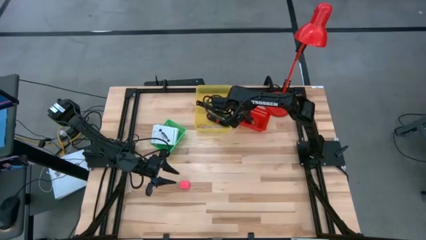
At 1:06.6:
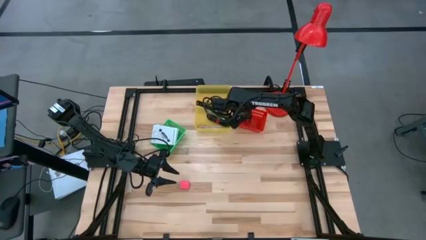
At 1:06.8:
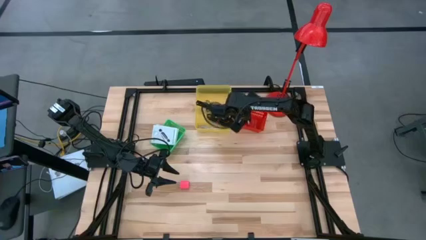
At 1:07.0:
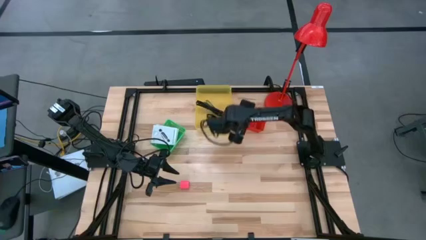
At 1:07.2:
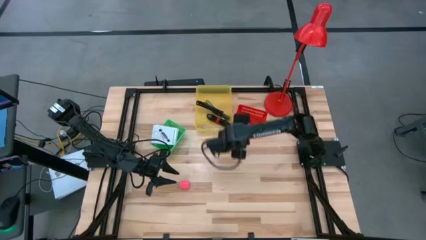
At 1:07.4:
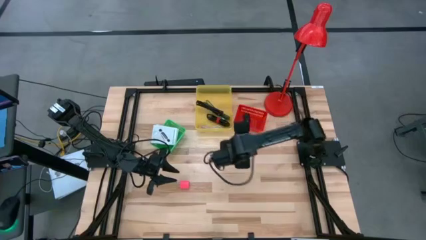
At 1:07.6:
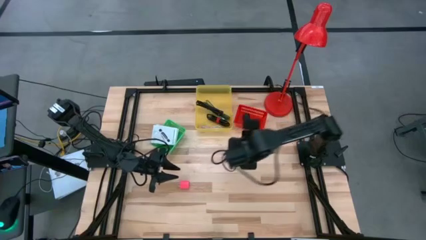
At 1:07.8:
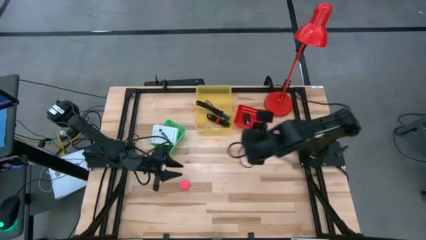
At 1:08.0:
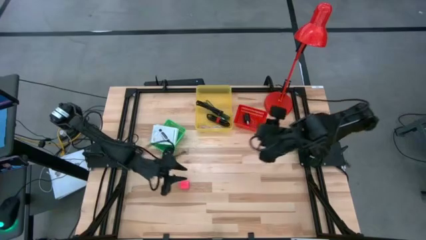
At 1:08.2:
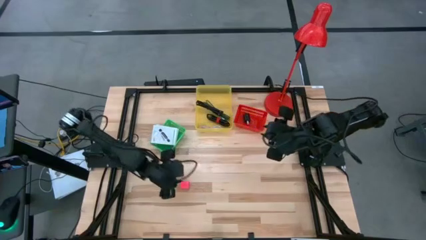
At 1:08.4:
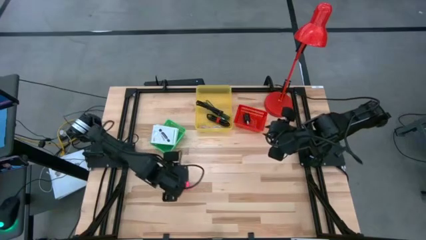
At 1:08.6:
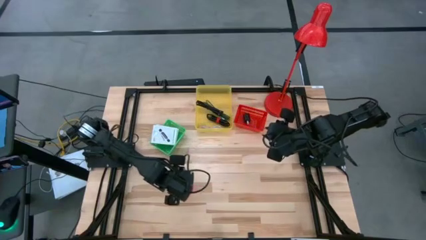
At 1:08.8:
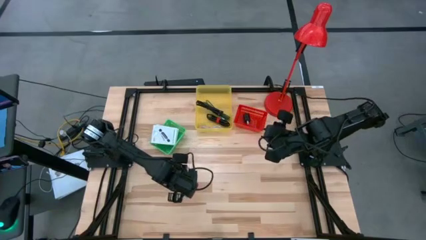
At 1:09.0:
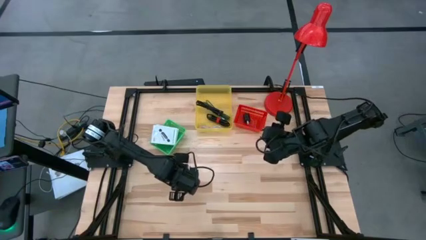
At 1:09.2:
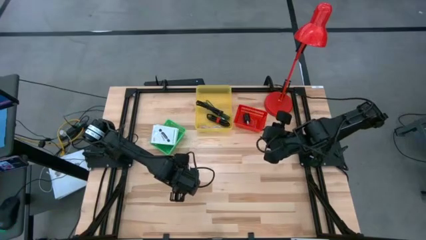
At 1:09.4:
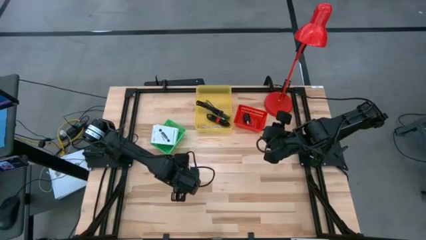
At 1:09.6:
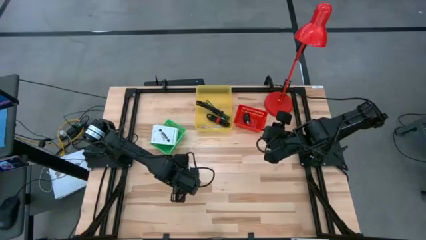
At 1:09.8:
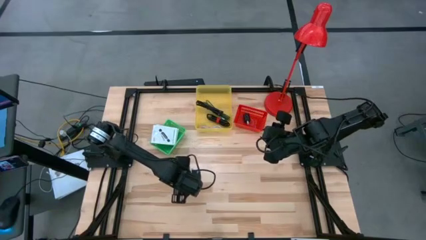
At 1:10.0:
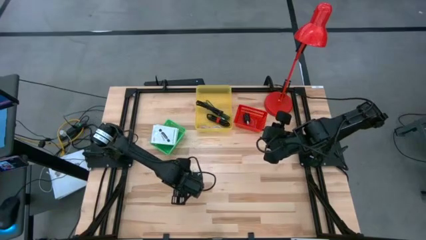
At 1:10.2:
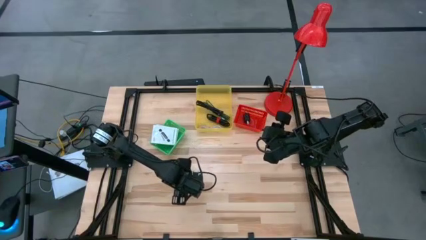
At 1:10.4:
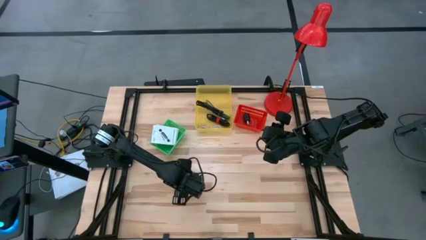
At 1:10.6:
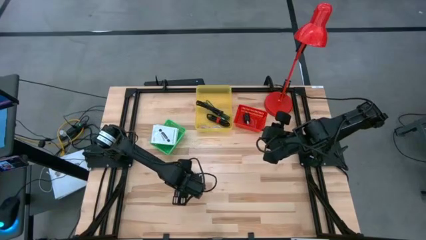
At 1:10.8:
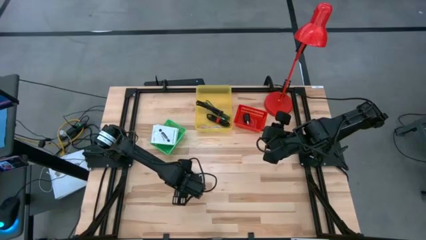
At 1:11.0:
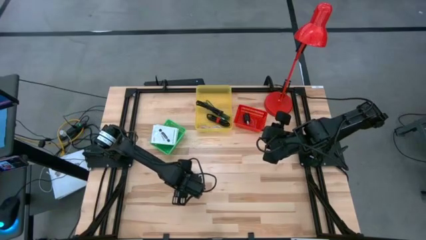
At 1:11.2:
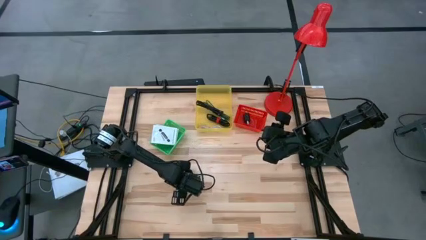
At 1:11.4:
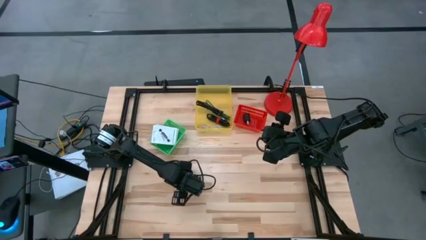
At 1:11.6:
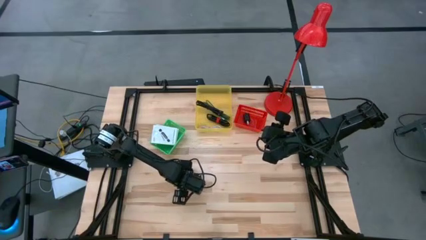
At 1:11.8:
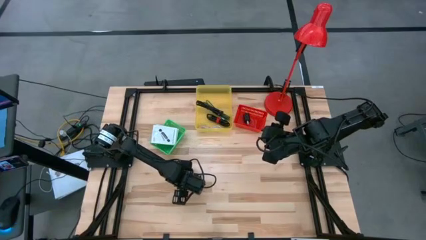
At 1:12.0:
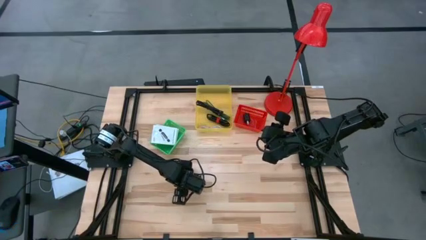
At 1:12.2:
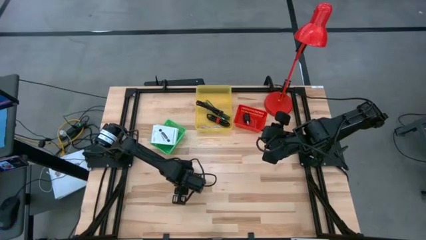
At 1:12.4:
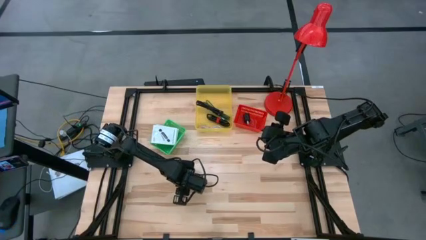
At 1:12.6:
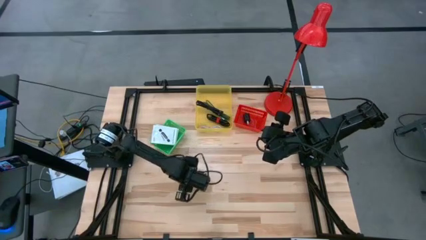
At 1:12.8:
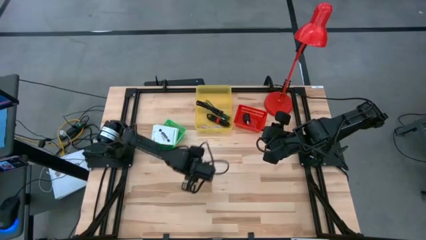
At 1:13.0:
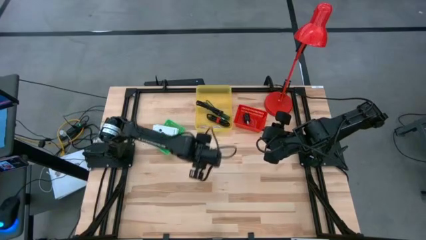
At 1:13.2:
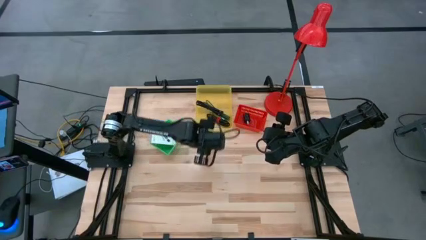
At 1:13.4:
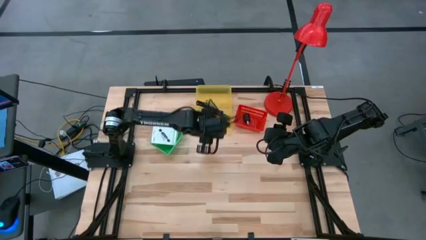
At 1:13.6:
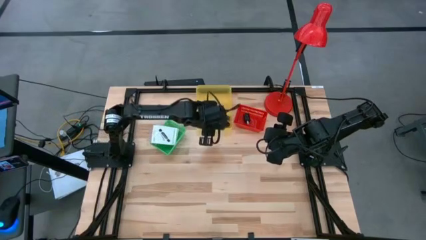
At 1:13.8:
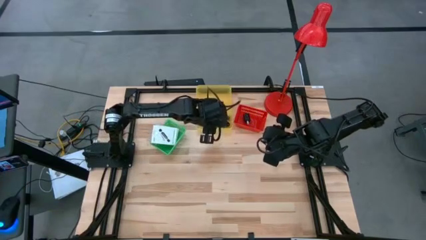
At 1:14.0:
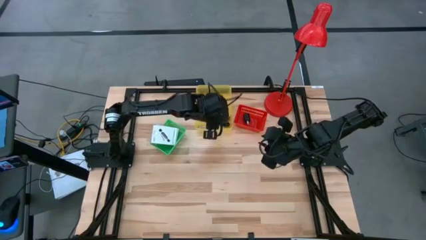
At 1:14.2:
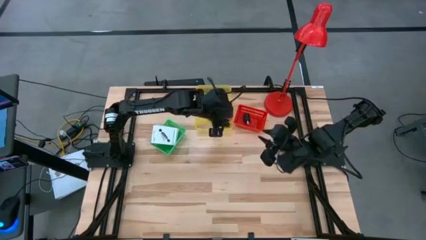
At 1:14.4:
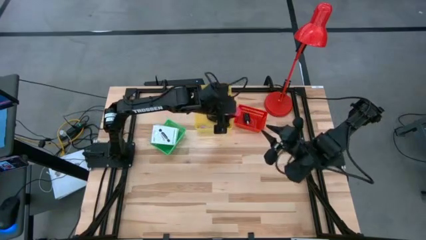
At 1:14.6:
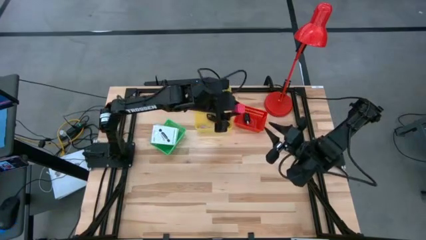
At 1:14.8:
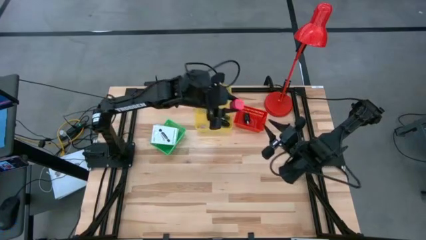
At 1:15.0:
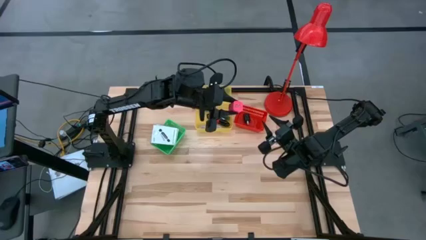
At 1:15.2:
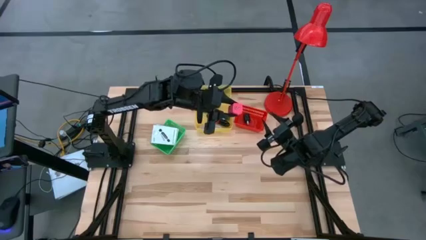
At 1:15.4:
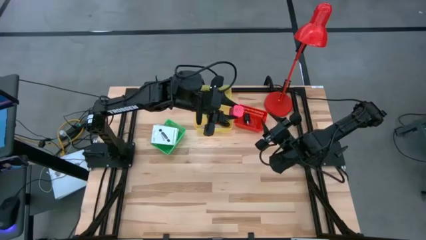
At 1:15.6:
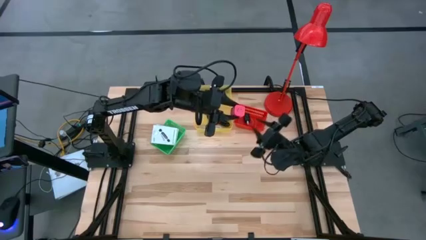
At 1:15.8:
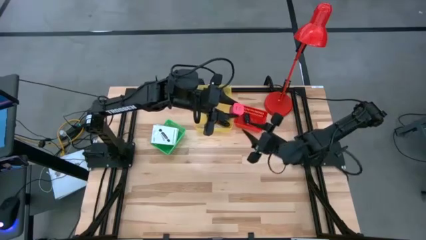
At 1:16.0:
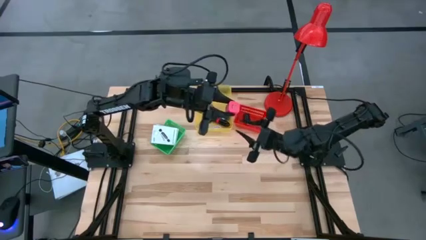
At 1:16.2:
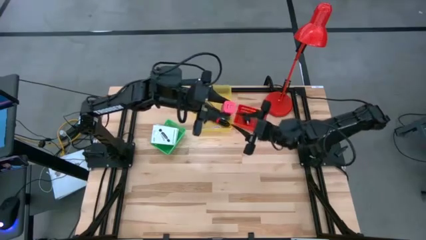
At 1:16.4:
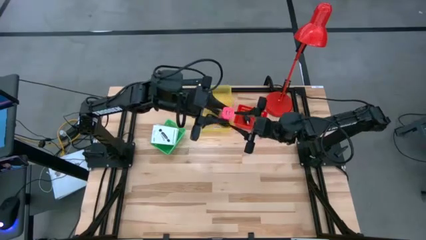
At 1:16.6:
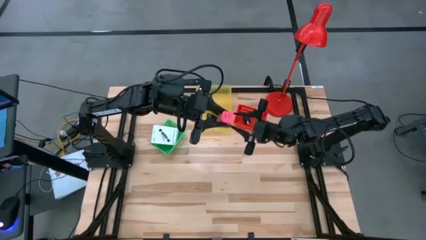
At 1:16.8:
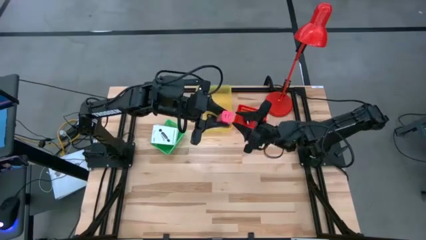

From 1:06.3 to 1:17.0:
Task: Pick and place items into bin
Put the pink charger adapter into the red basket

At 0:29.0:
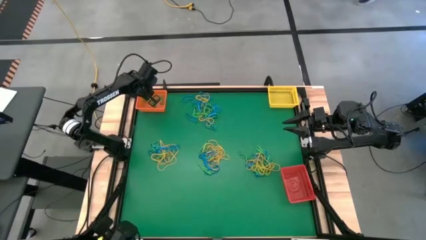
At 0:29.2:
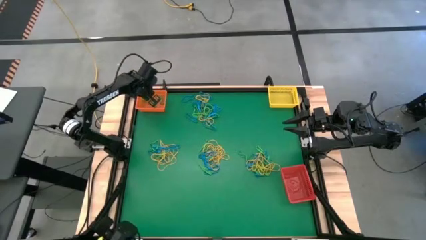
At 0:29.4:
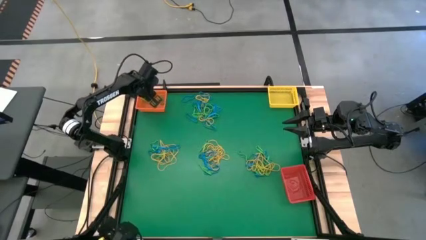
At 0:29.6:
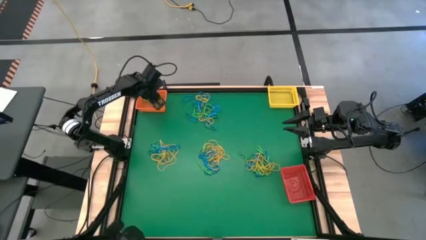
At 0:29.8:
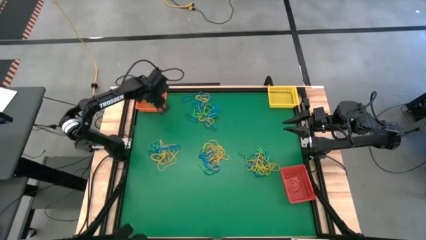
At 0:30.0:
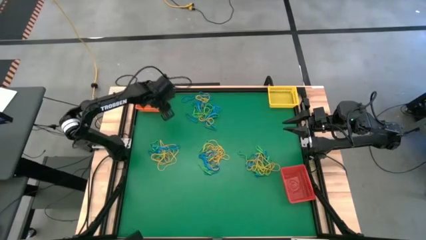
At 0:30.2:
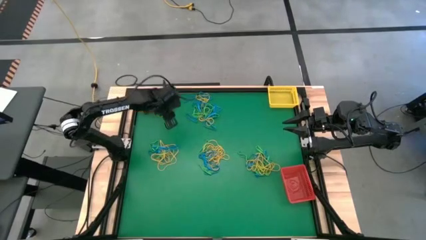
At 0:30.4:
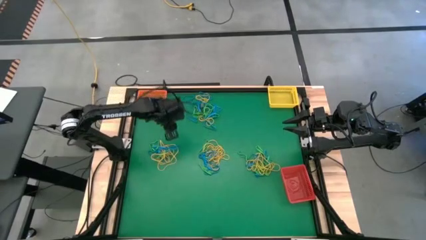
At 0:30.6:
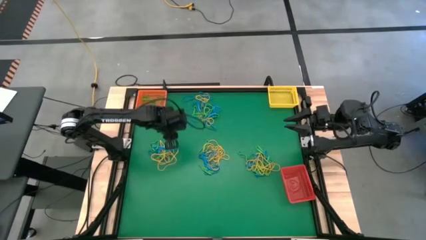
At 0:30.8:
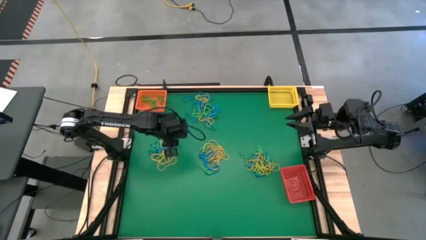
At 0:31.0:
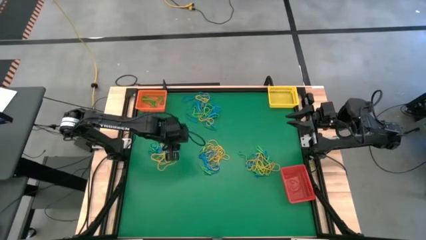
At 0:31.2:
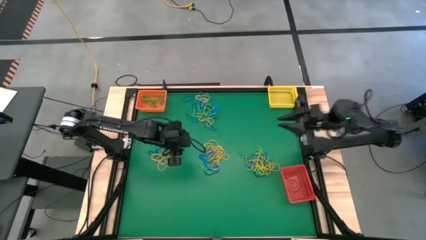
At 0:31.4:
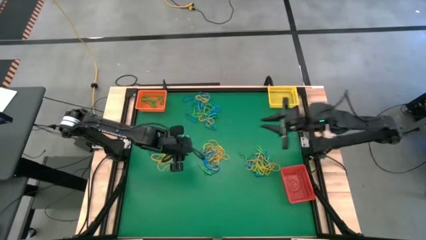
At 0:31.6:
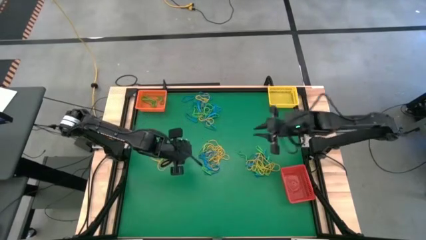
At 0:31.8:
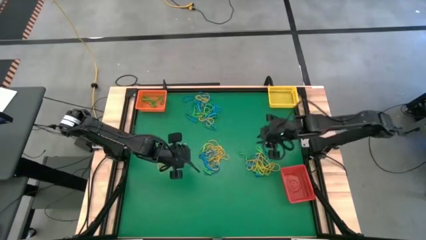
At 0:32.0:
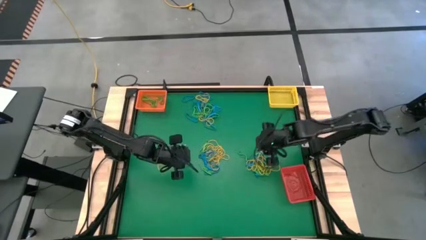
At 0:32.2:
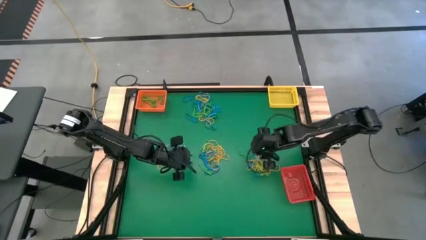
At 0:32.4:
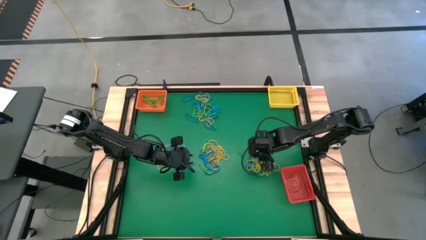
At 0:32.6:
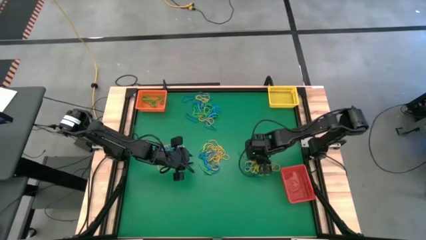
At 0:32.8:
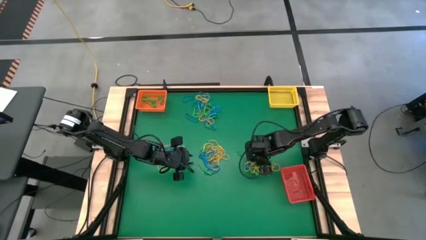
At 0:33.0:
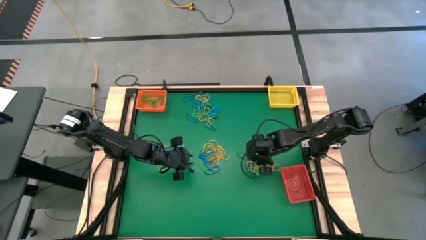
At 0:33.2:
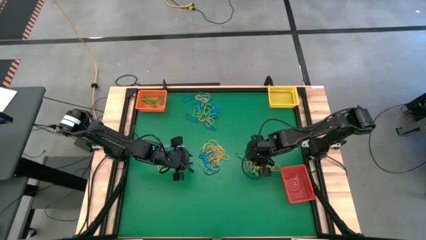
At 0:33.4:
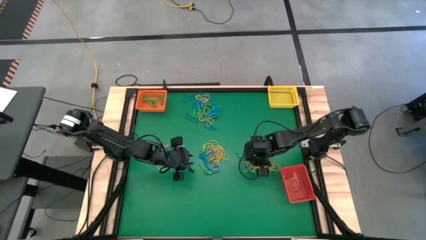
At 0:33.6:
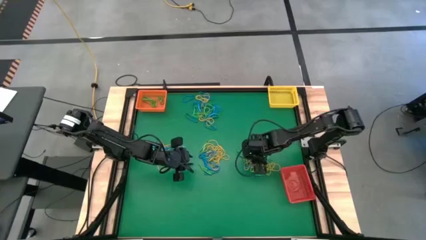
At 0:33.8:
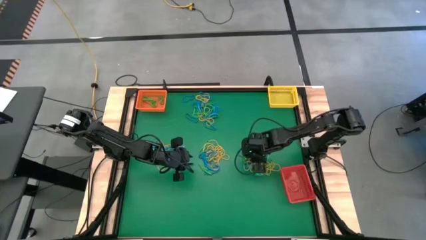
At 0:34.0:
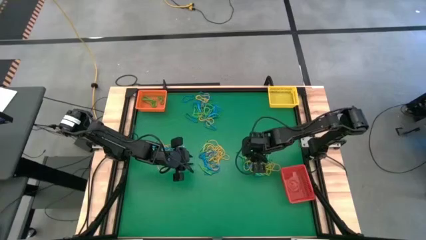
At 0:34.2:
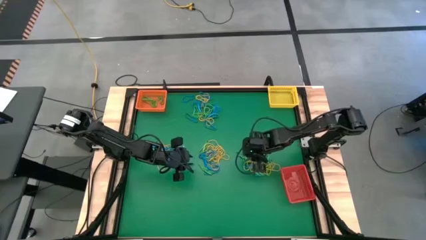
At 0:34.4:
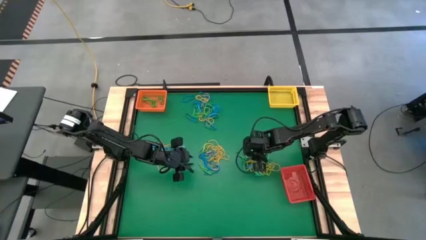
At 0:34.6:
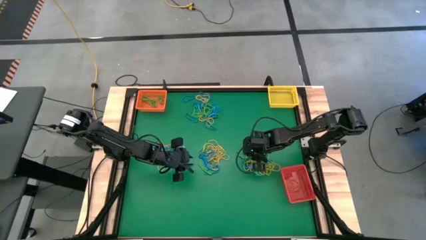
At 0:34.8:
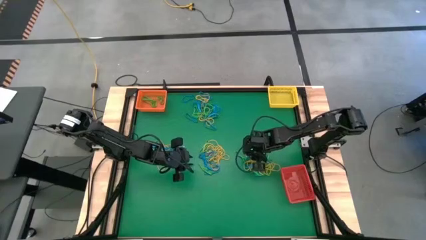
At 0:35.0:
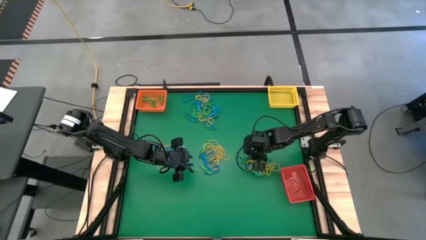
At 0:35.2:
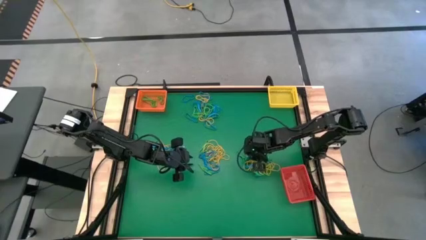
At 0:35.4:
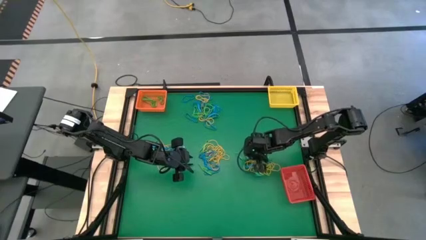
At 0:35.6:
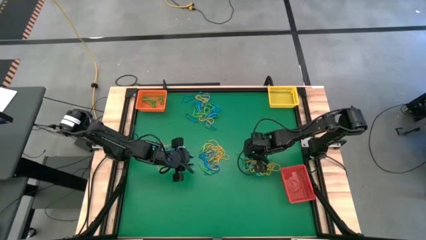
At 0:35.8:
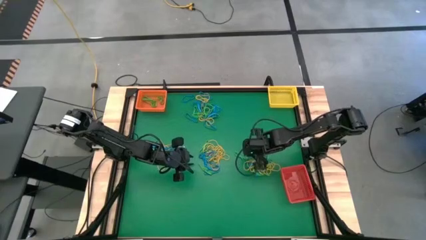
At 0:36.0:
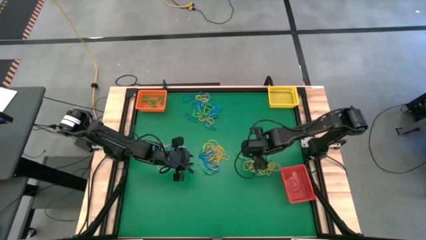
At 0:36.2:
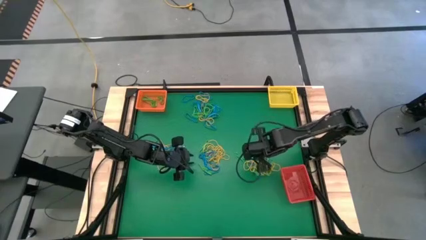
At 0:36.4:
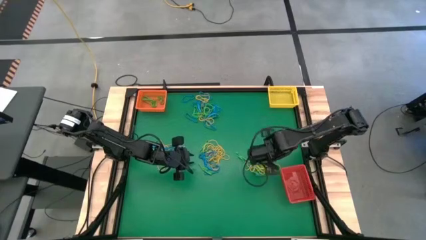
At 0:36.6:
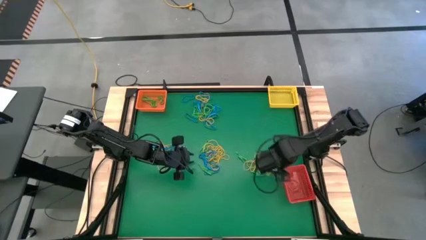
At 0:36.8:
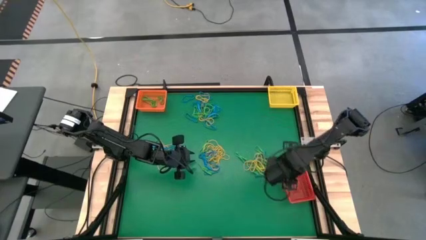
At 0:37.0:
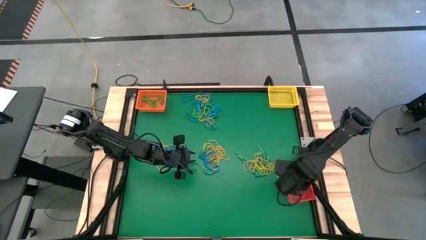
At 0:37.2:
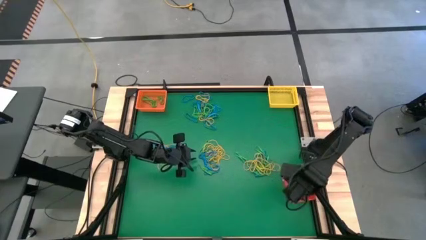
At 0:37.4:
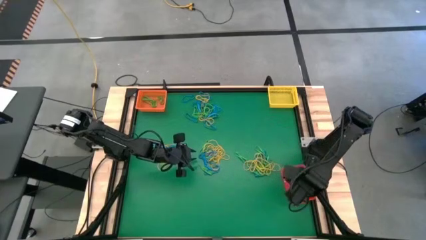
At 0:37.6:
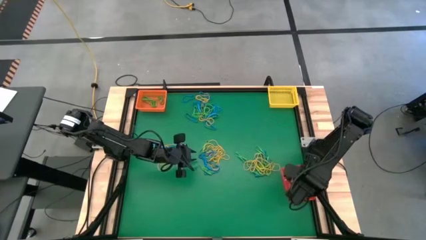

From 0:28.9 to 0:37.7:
Task: Sort rubber bands into baskets
Put the blue rubber band into the red bin
